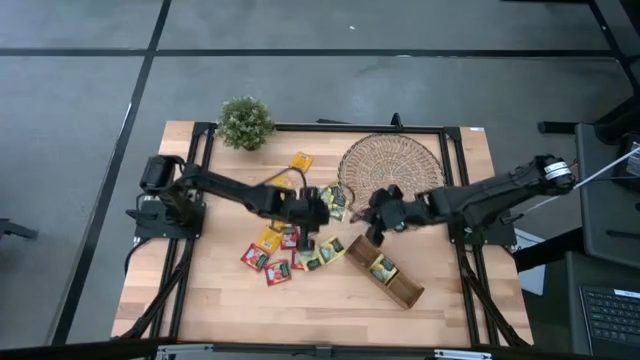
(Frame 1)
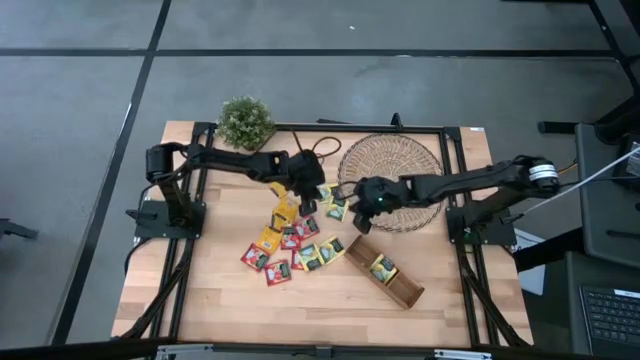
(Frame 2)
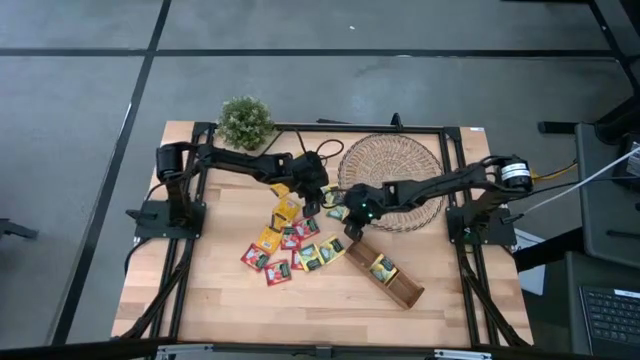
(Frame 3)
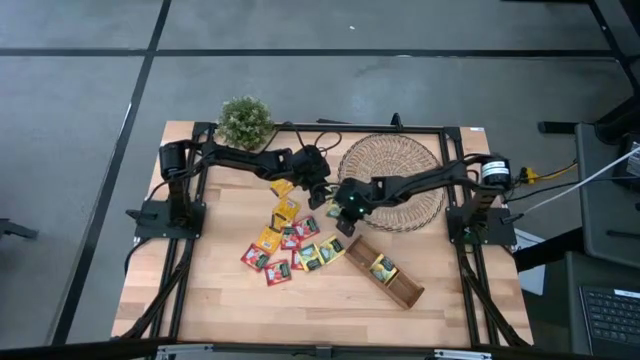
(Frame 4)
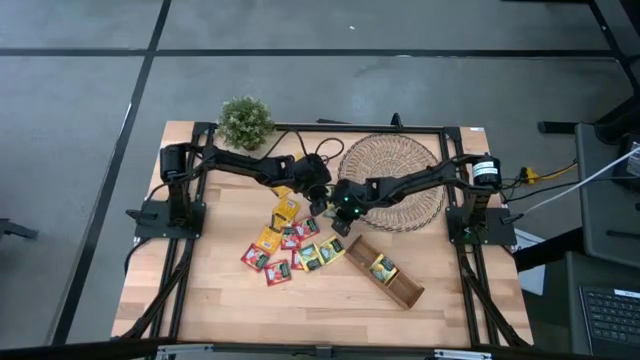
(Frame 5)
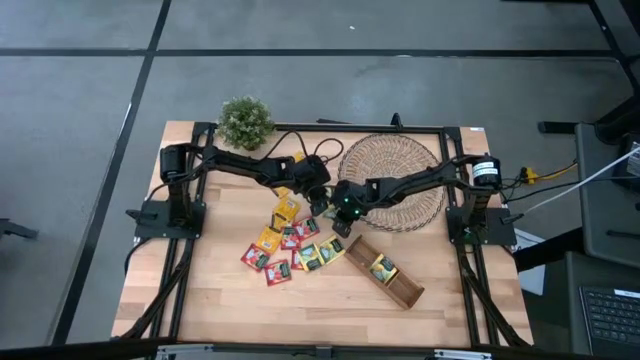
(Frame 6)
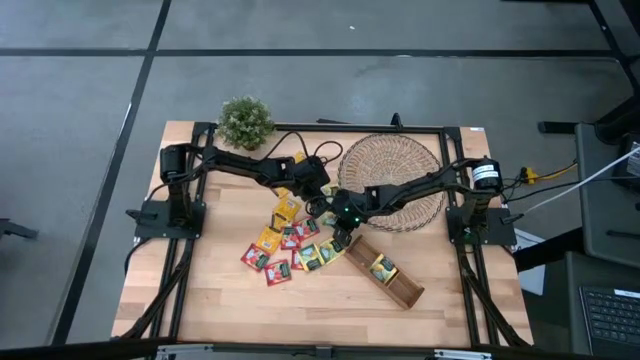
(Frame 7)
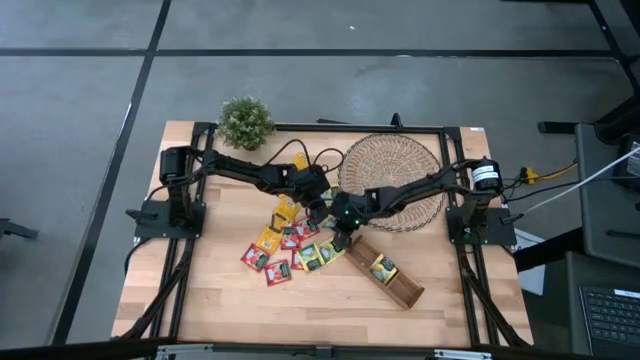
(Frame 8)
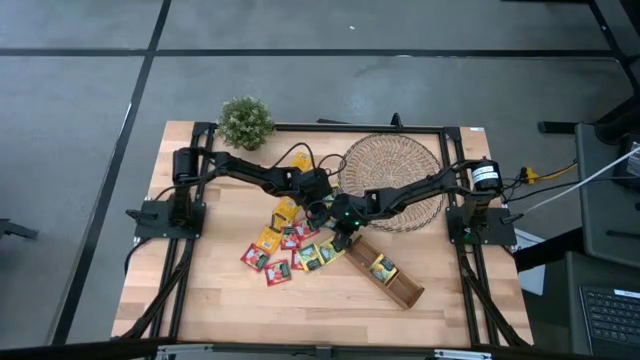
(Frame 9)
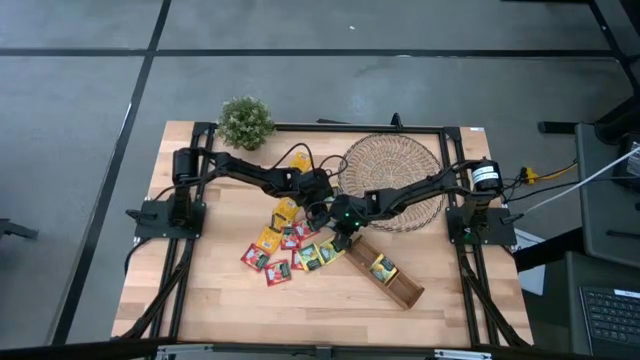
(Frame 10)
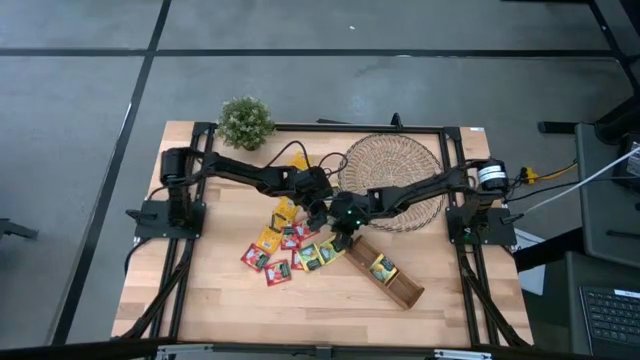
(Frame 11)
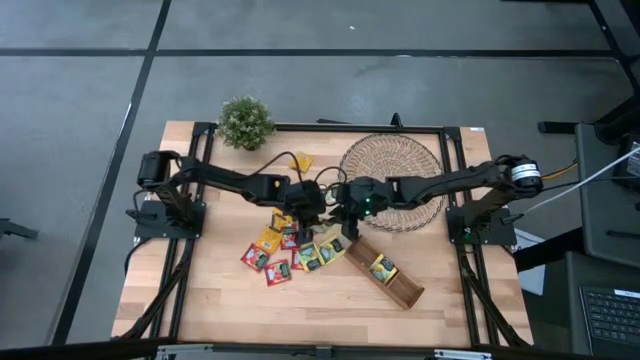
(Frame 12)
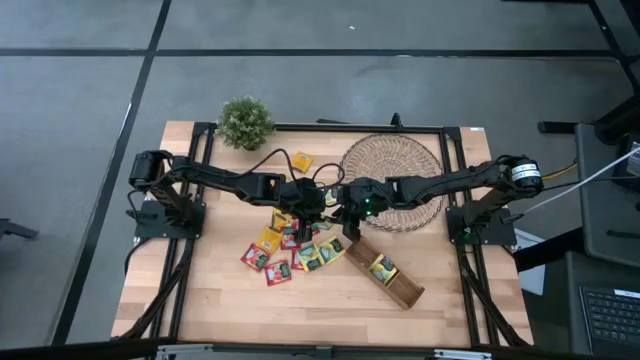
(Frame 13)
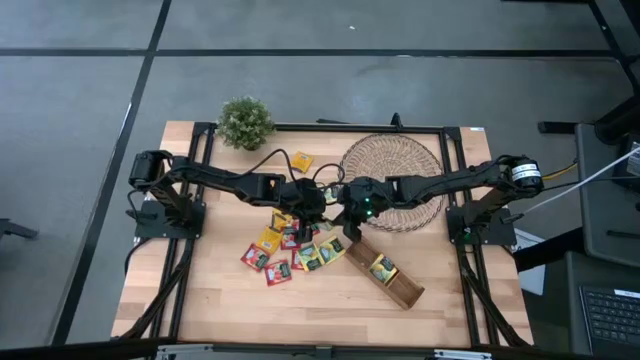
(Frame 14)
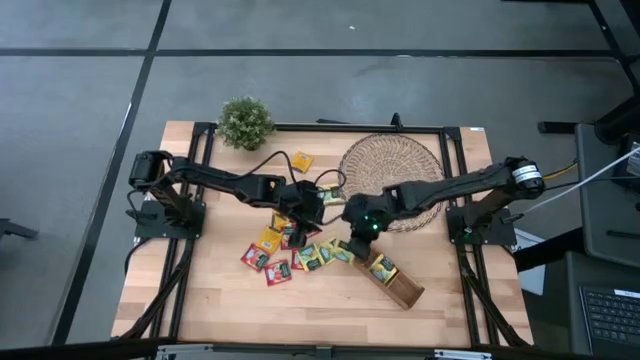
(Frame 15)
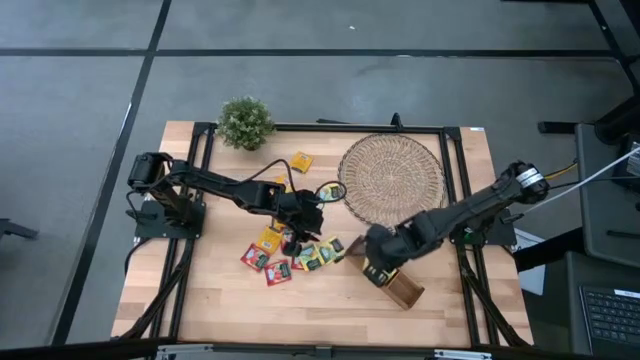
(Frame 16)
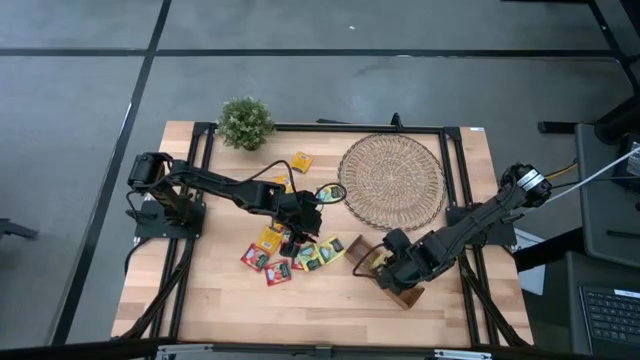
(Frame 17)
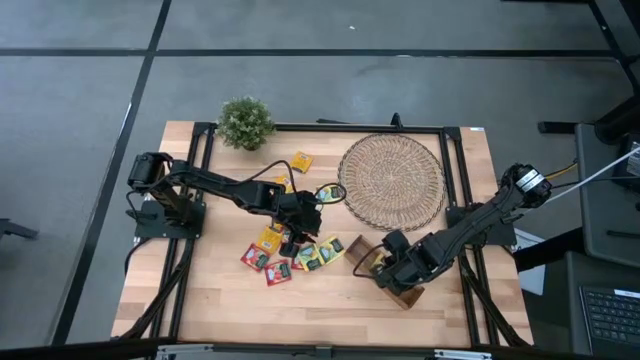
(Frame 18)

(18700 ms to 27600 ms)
Task: Pick & Place Tea
Put the yellow tea bag into the middle slot of the wooden organizer

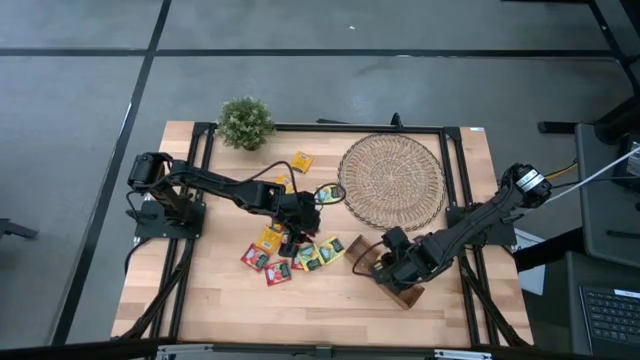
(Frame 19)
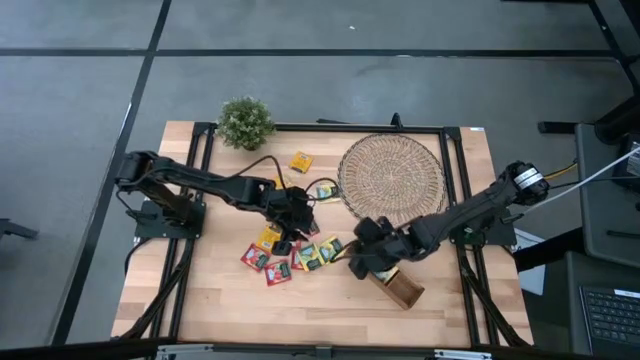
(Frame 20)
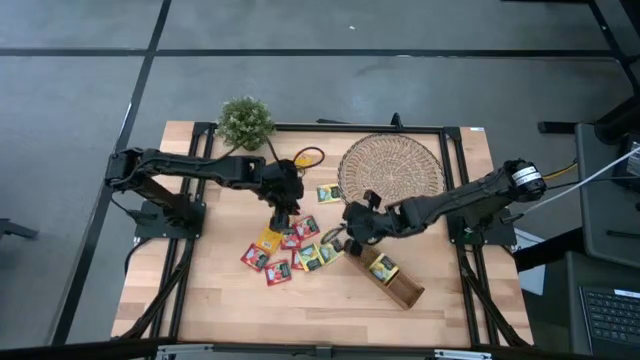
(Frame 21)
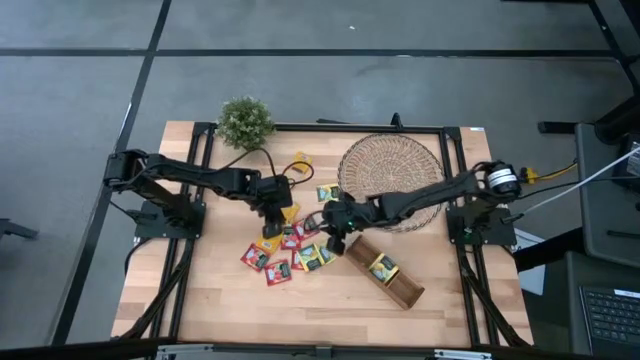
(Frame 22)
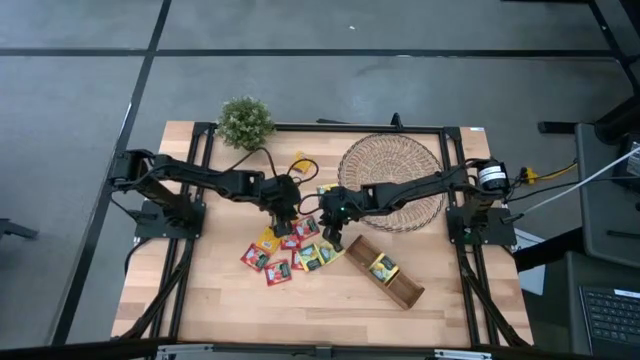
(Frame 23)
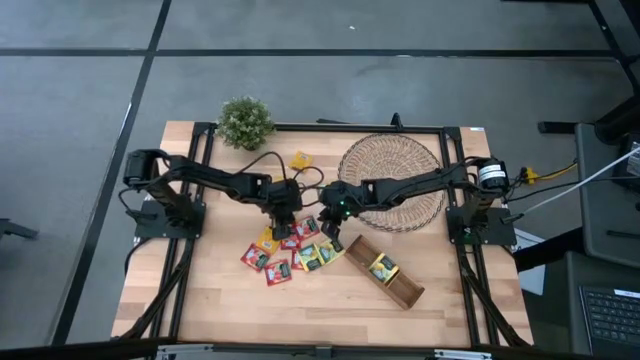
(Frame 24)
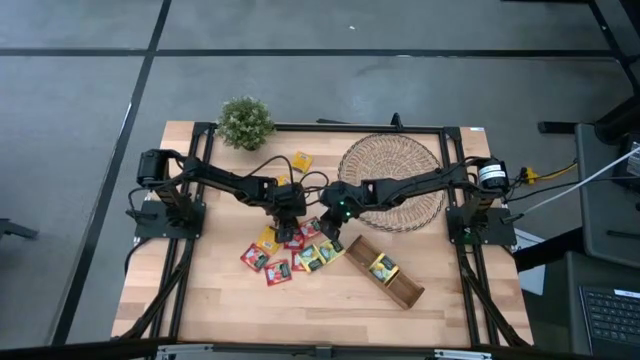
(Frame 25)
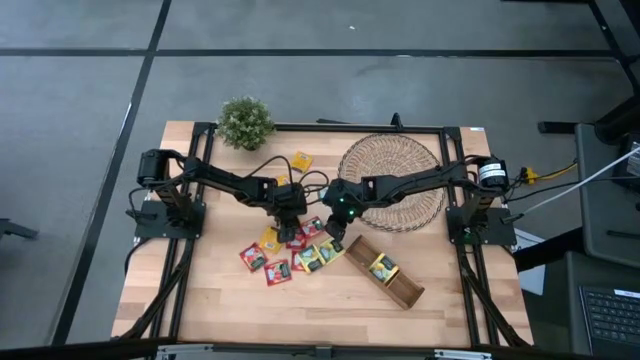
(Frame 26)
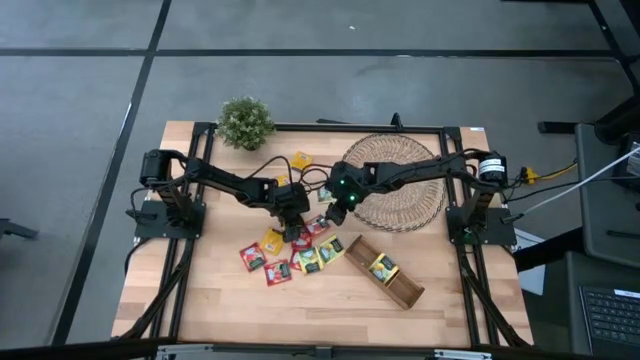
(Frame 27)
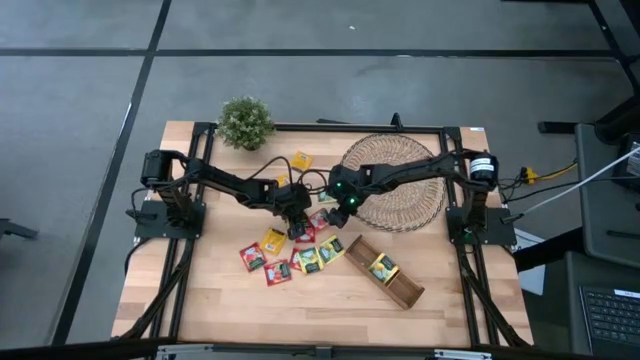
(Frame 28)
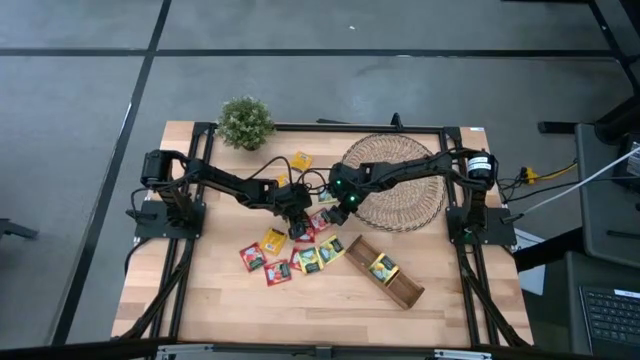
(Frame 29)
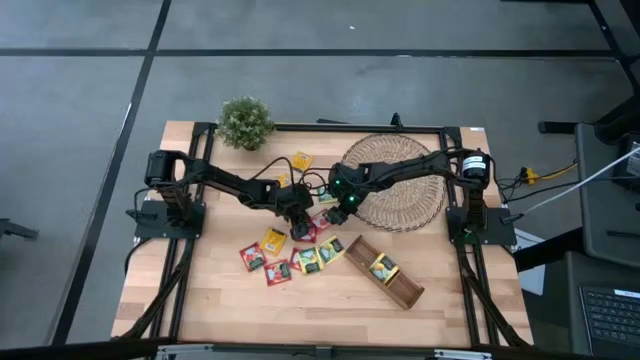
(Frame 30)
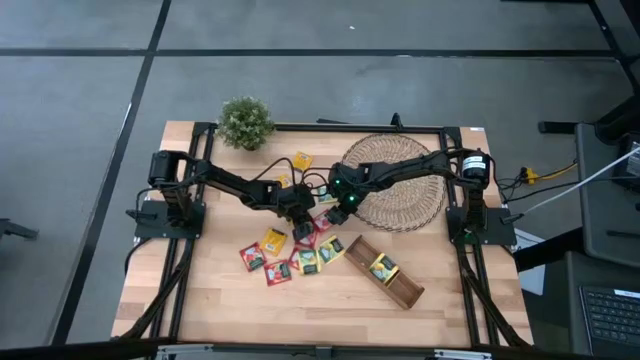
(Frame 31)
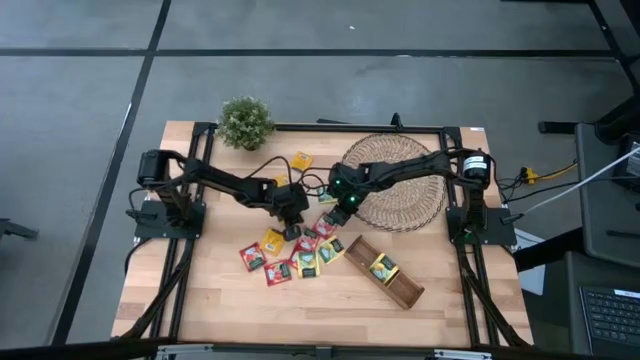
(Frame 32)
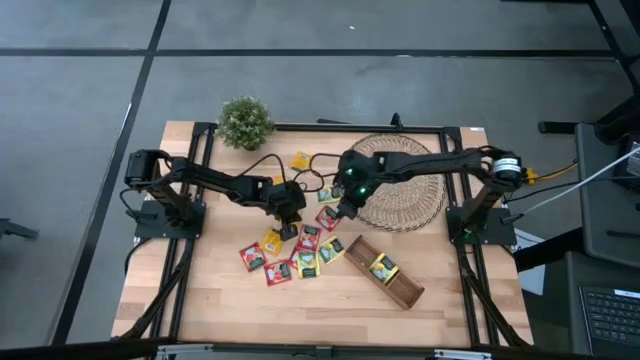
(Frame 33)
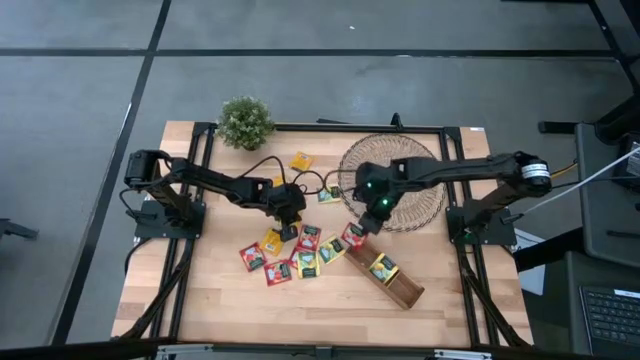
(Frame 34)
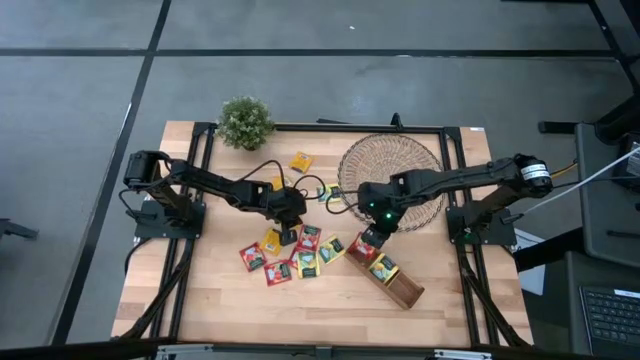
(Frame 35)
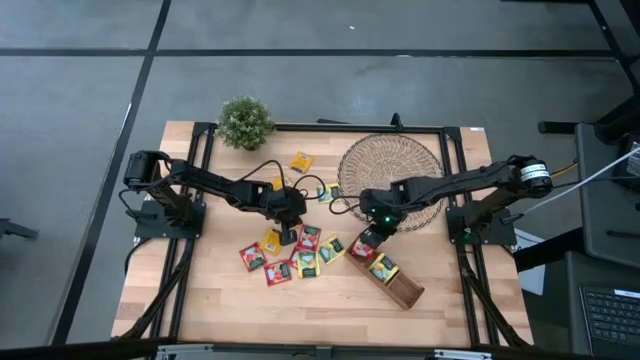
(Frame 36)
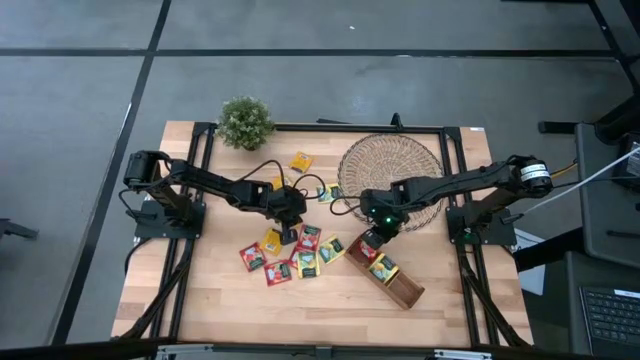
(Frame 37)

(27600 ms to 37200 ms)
Put the red tea bag into the left slot of the wooden organizer

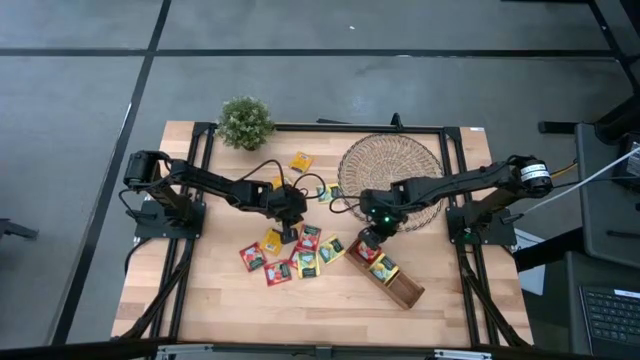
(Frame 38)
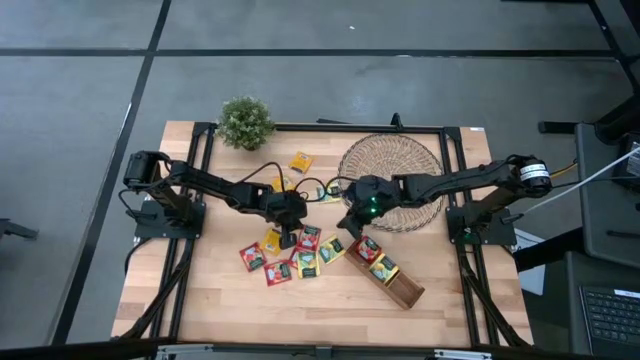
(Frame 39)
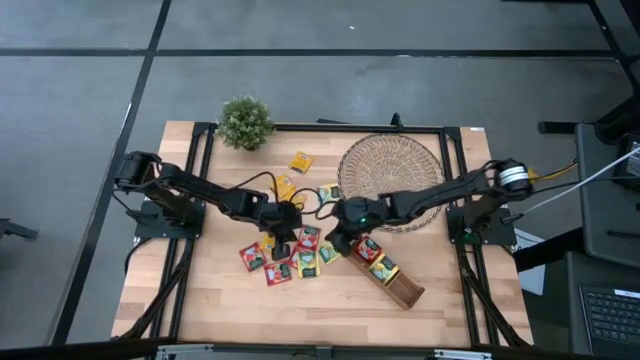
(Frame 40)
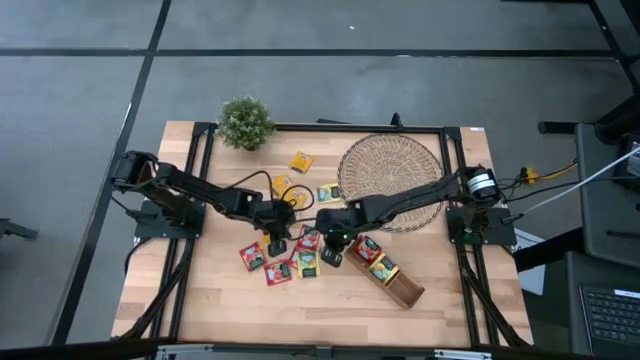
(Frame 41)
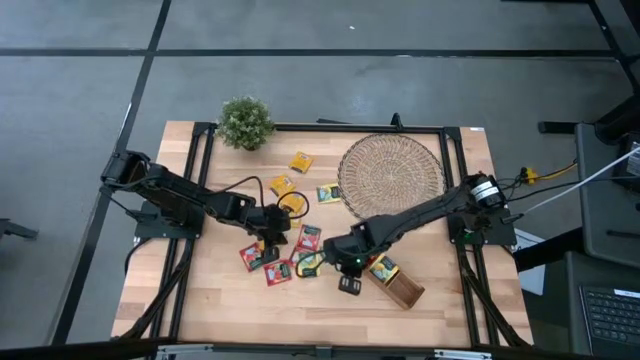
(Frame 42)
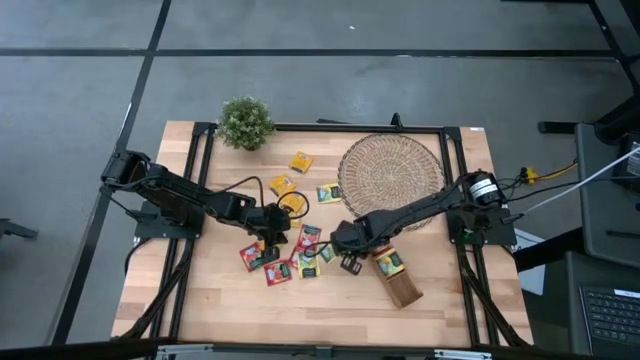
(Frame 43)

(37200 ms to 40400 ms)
Adjust the wooden organizer on the table
